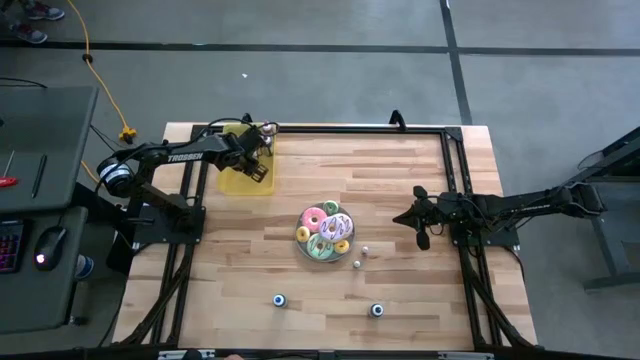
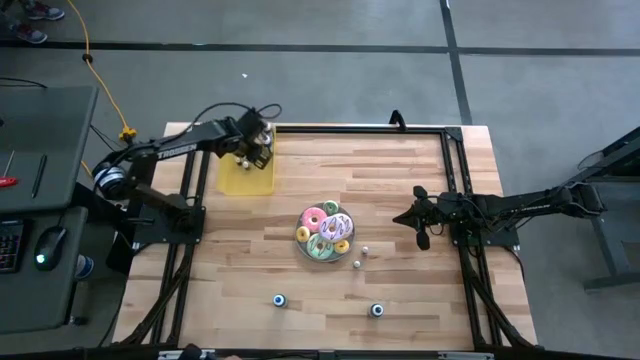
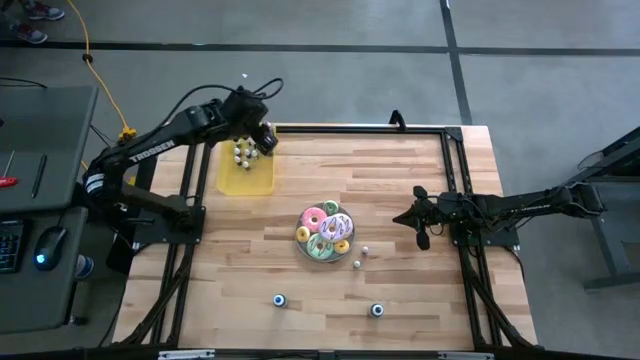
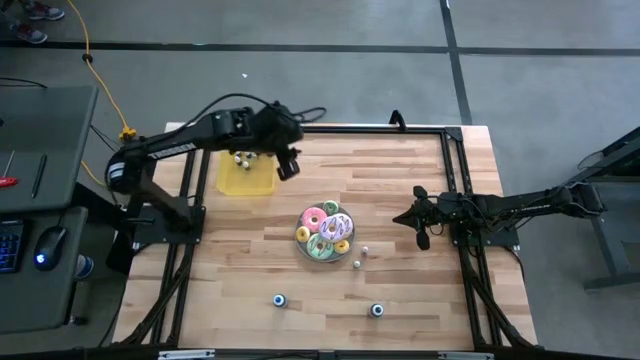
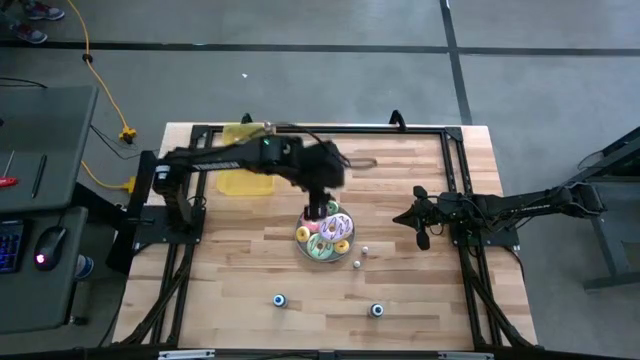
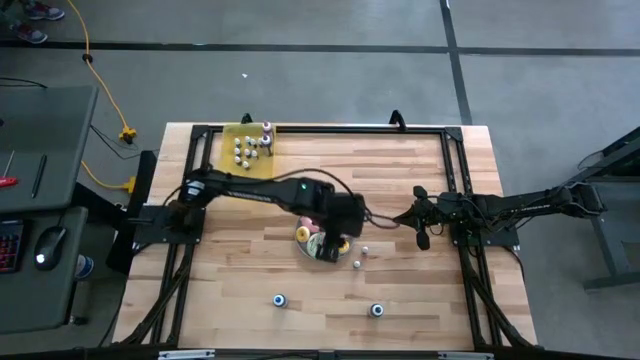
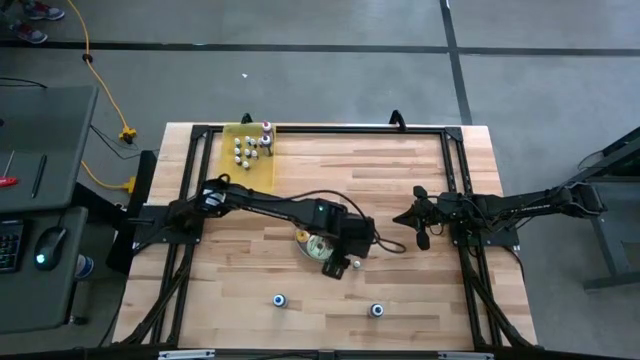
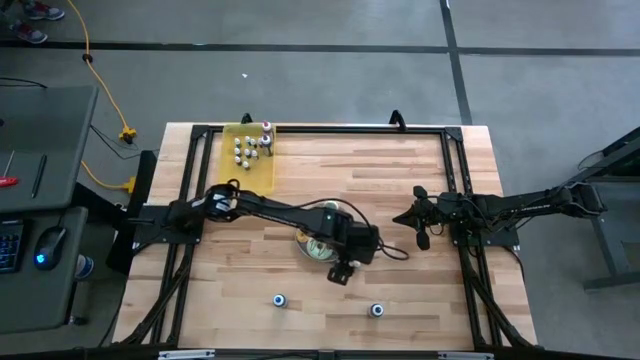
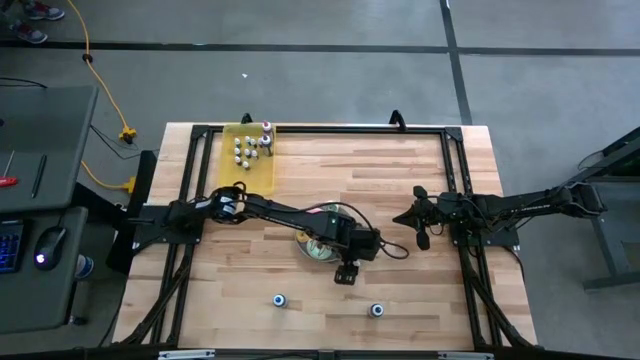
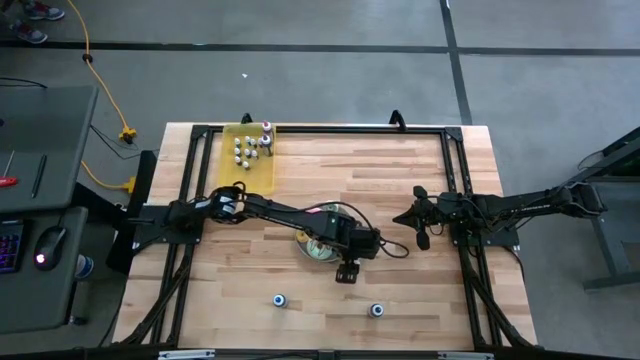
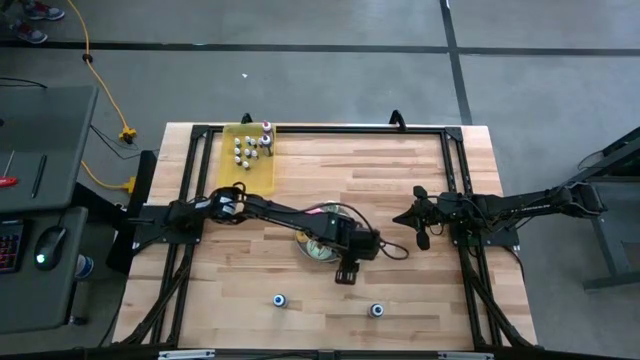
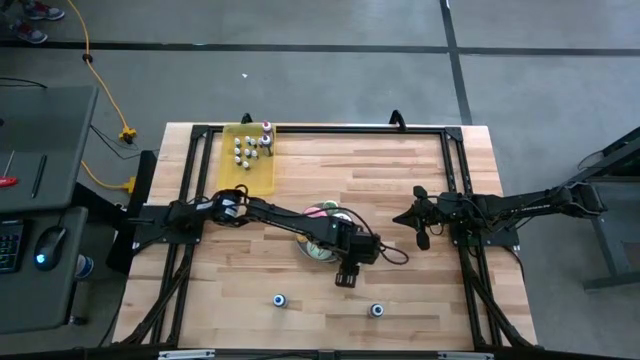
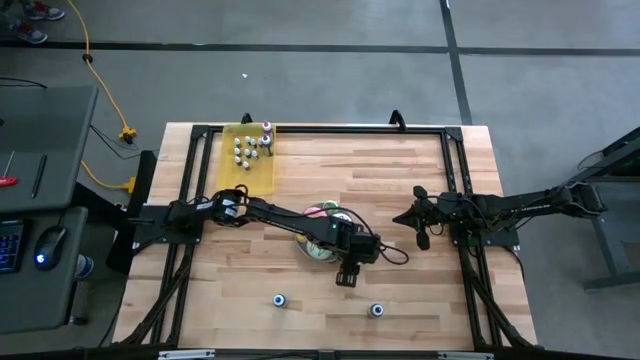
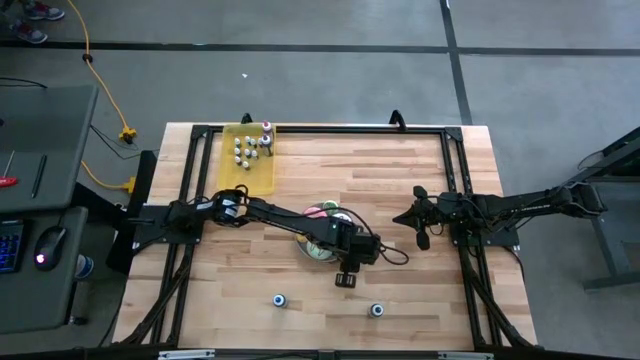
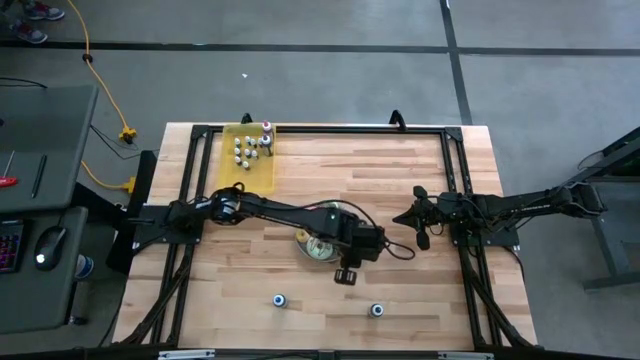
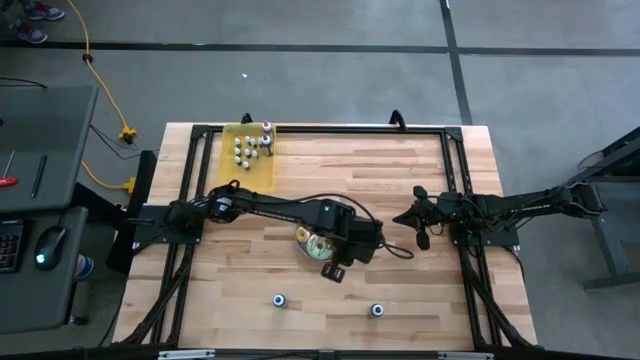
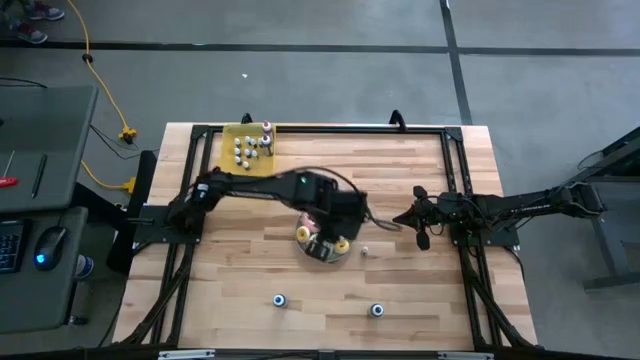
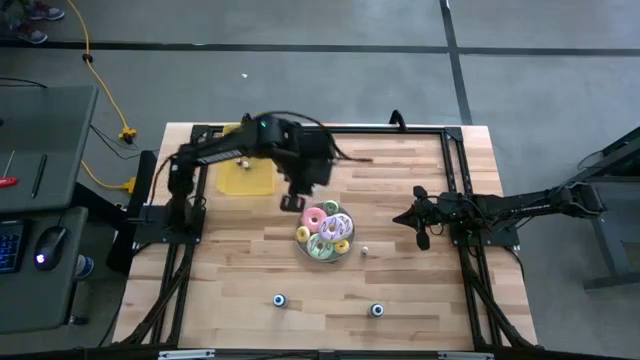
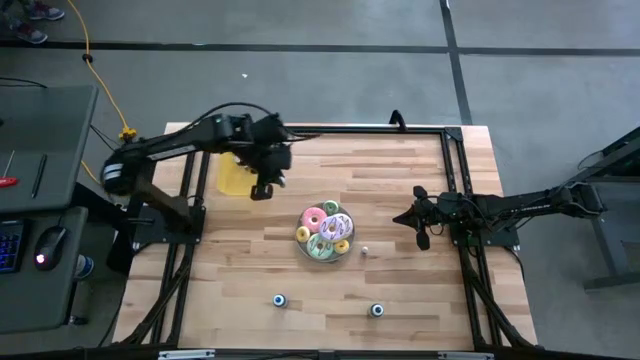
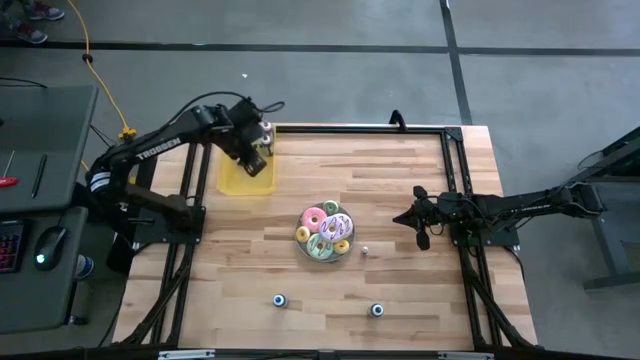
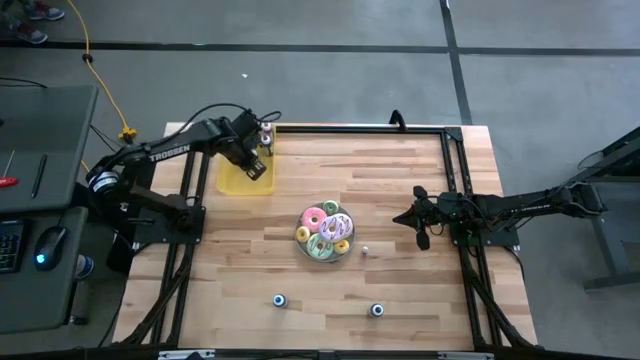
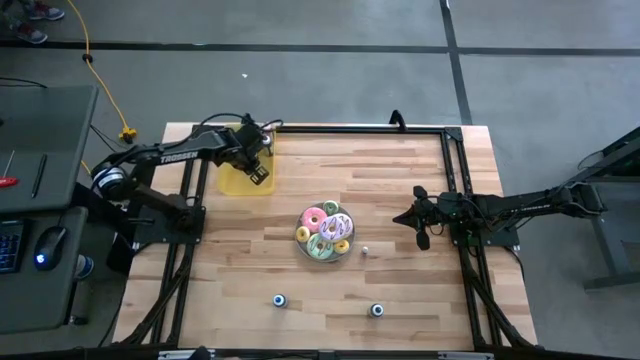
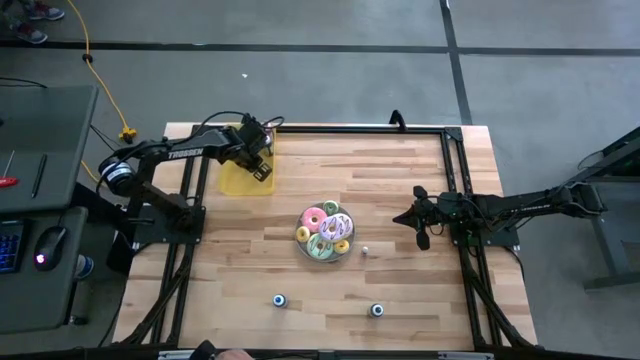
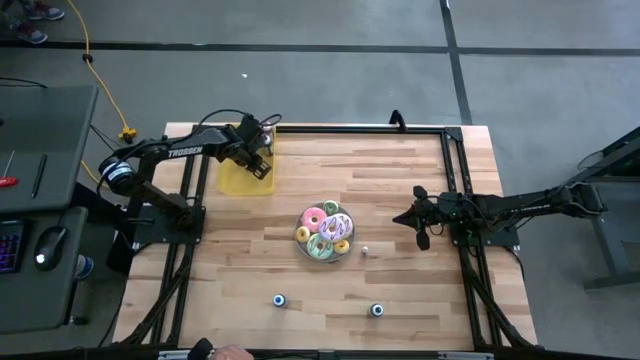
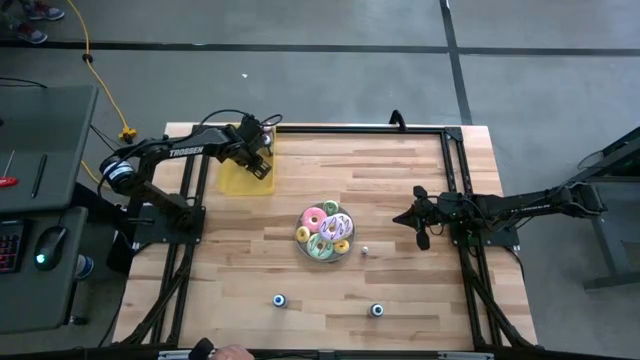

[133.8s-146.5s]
Task: Pick & Place food coloring
Put the small green food coloring bottle into the yellow bin

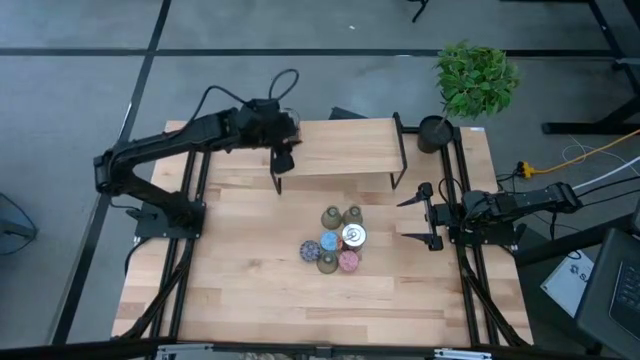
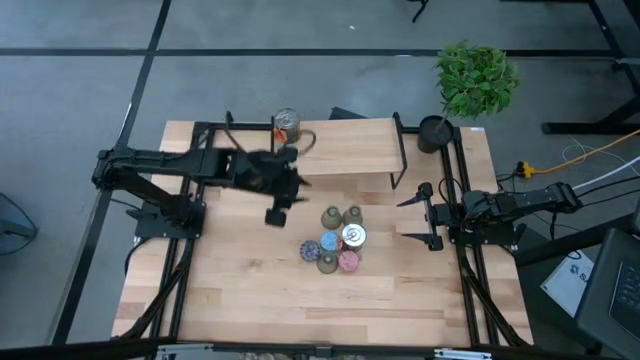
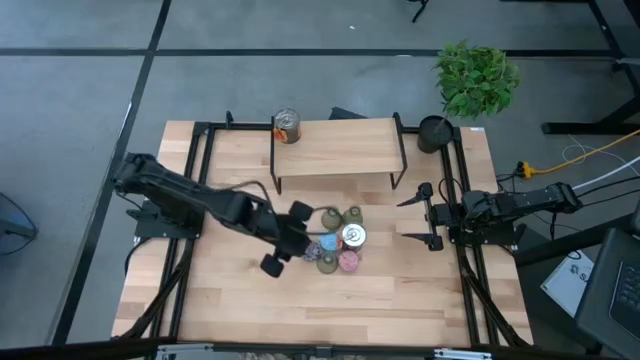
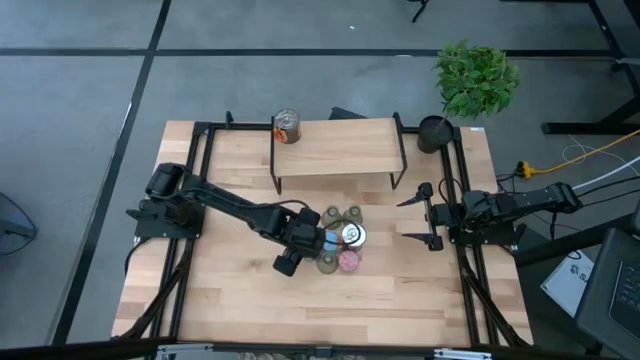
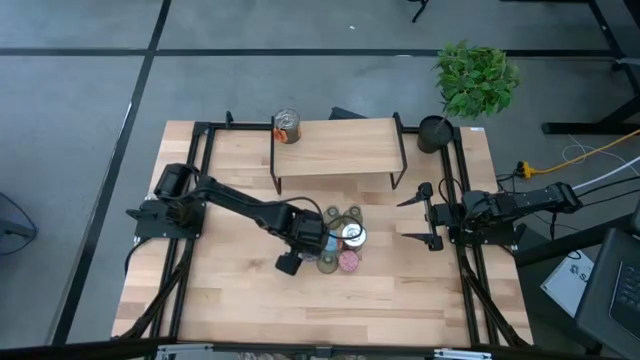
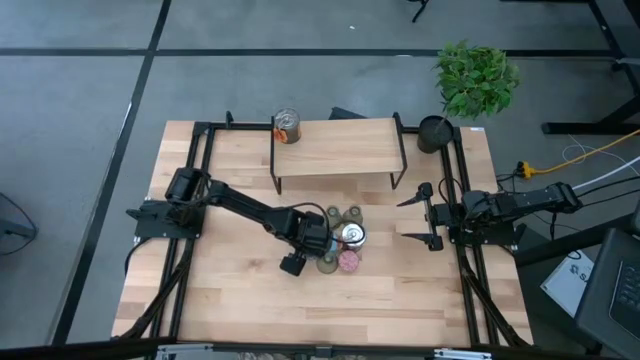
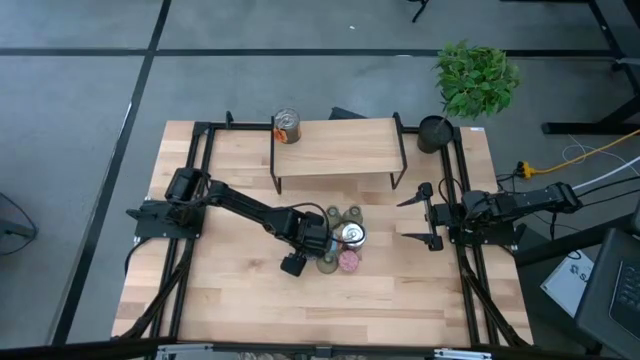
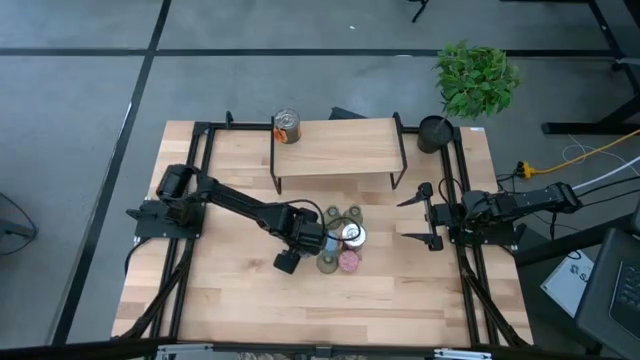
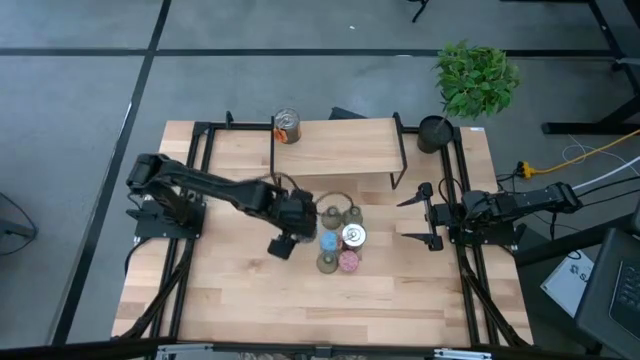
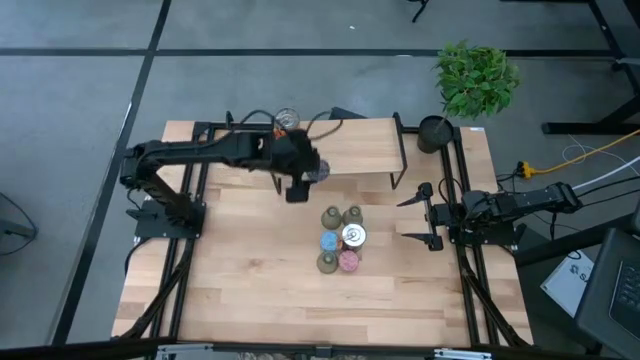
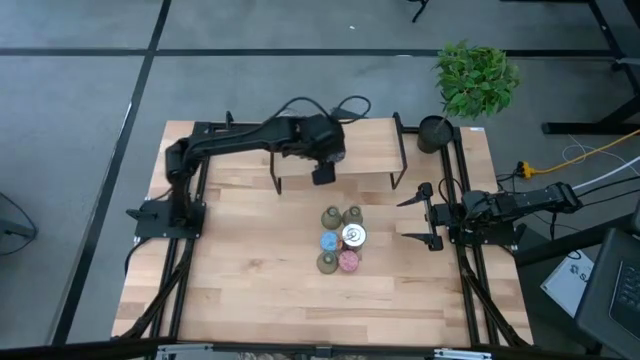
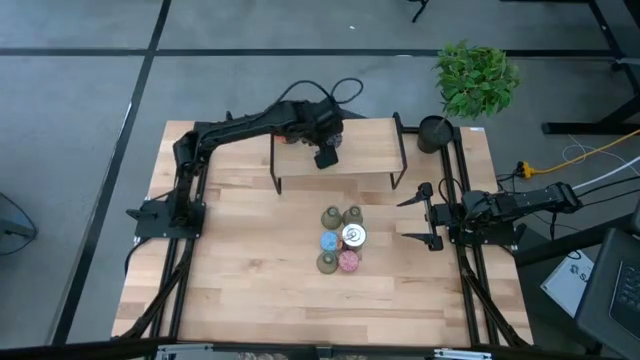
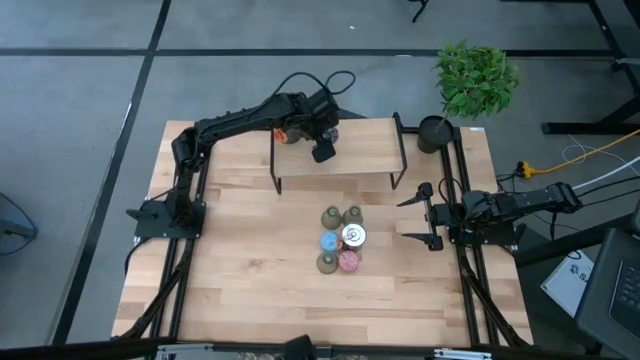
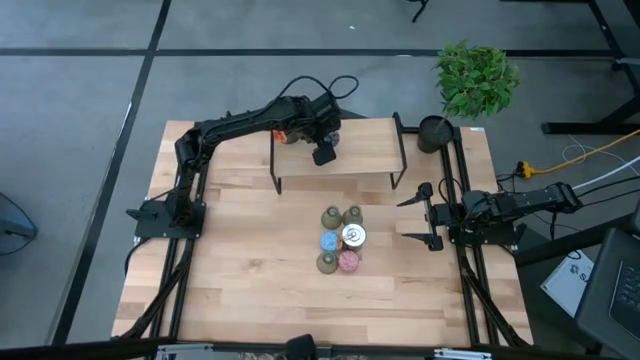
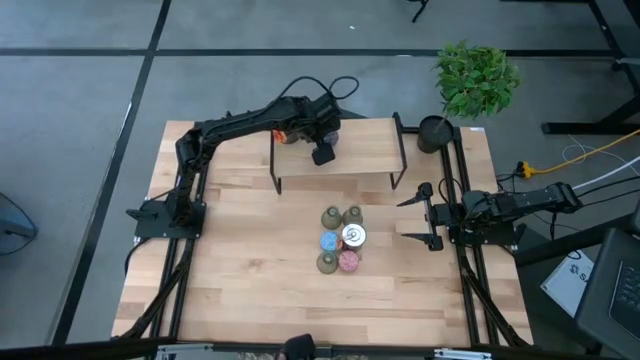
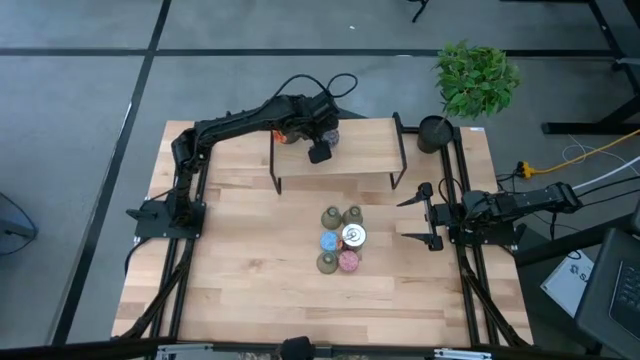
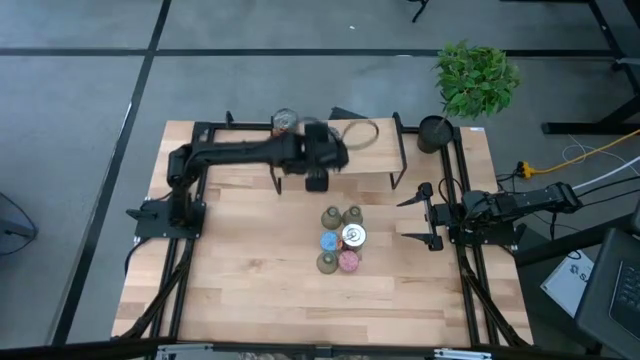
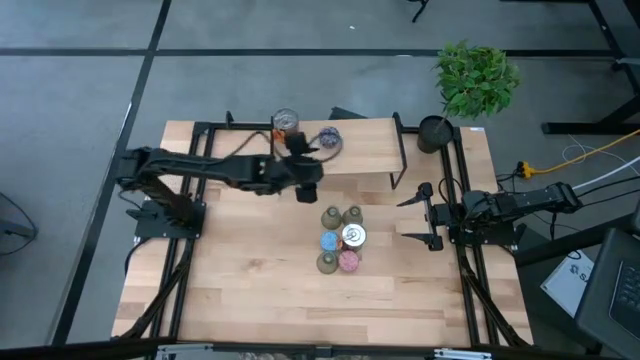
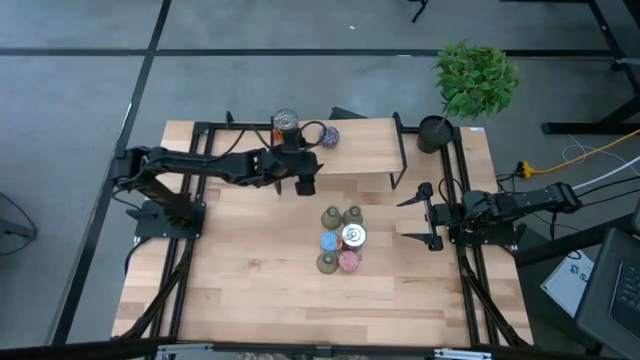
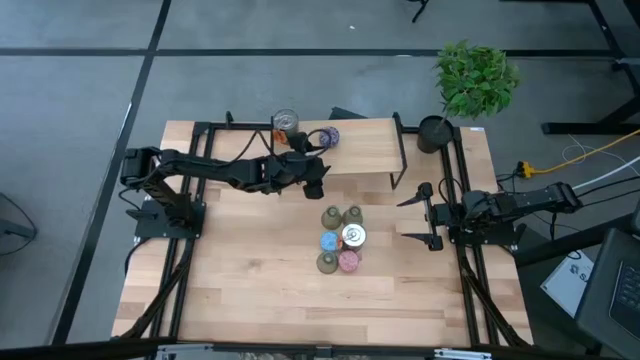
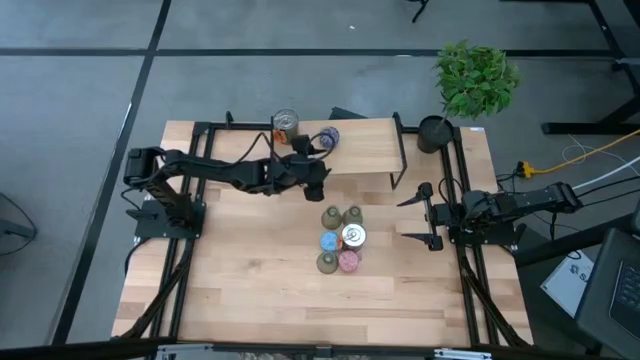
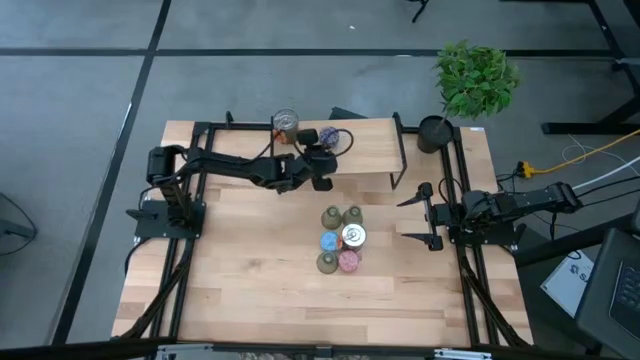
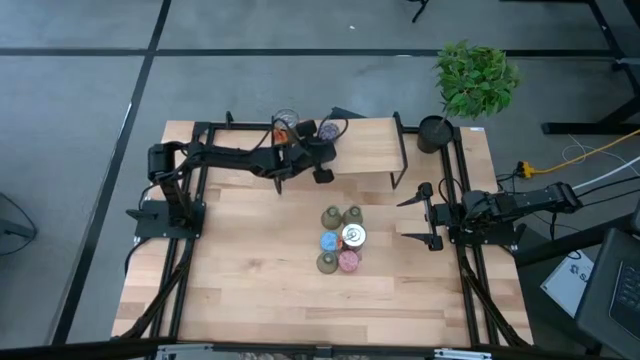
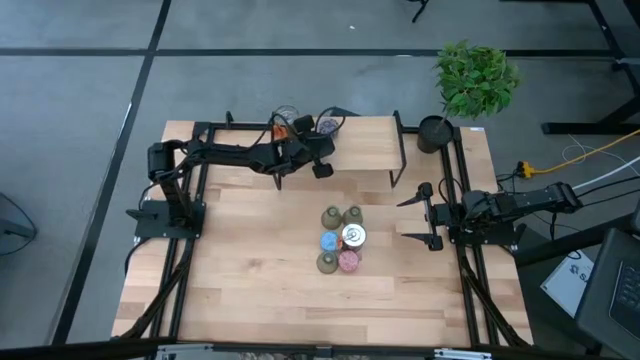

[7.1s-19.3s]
Task: Pick & Place candle stick holders
Put the red scented candle on the shelf
